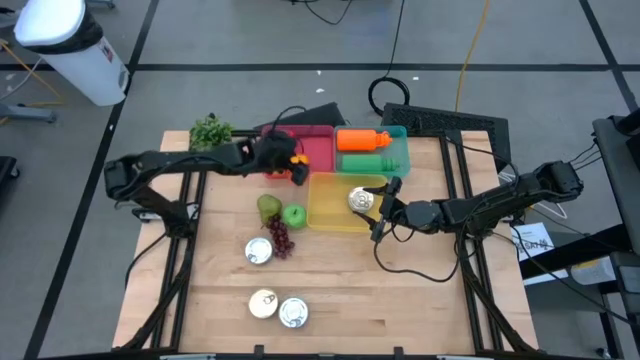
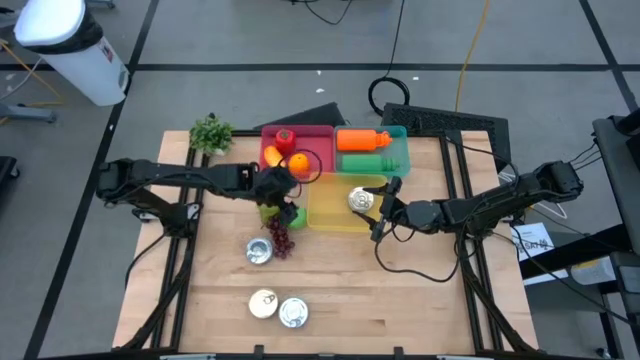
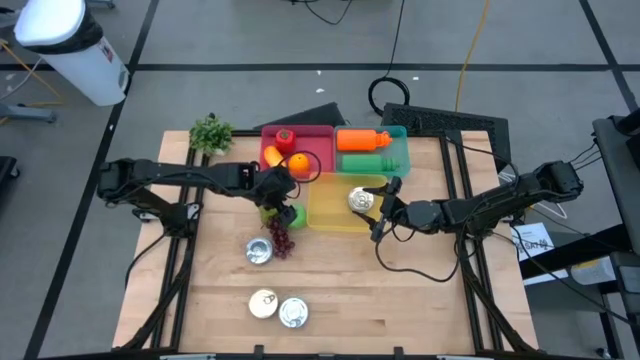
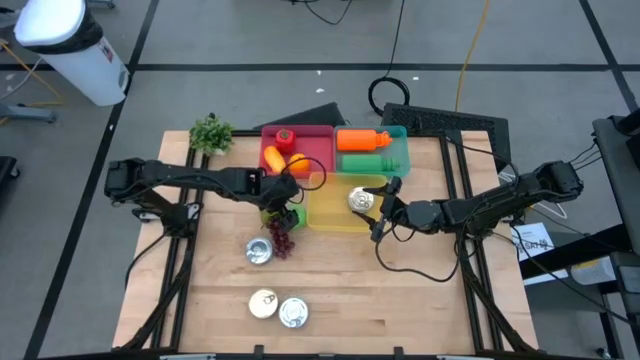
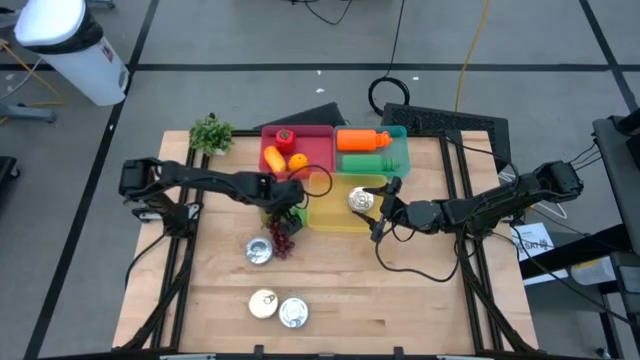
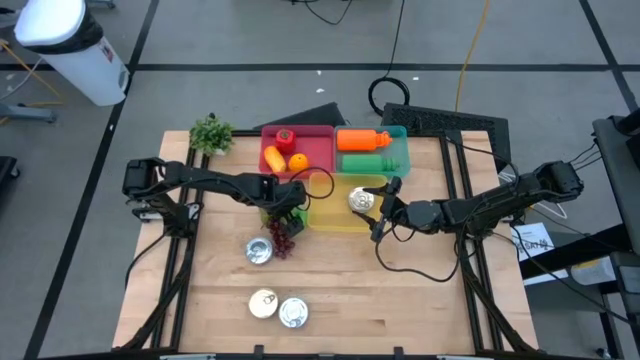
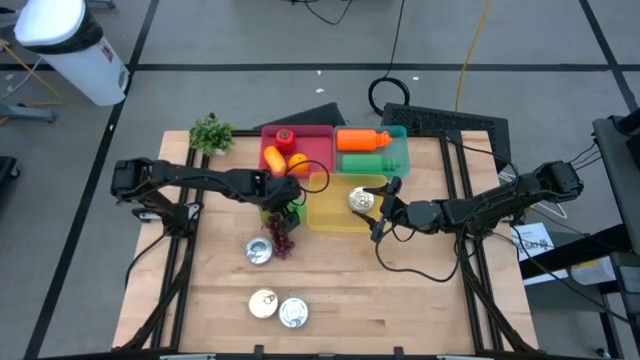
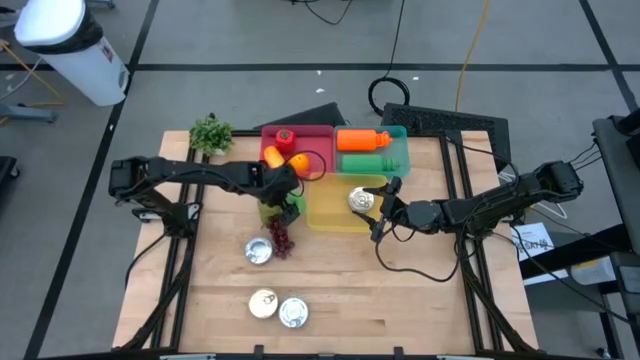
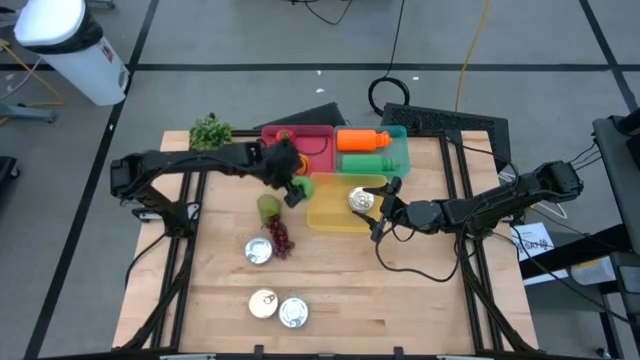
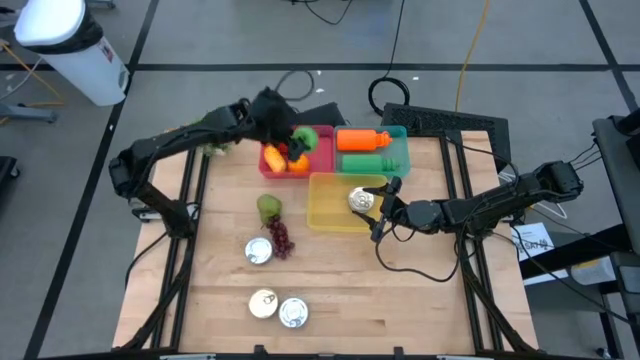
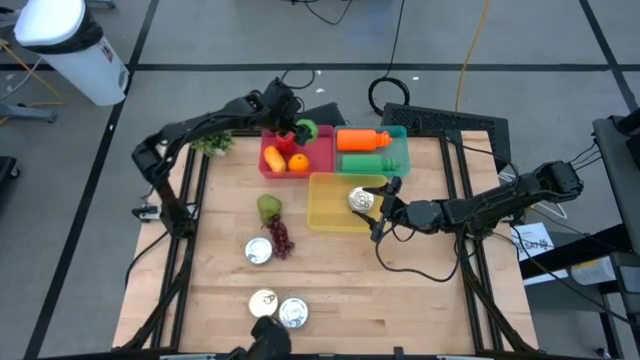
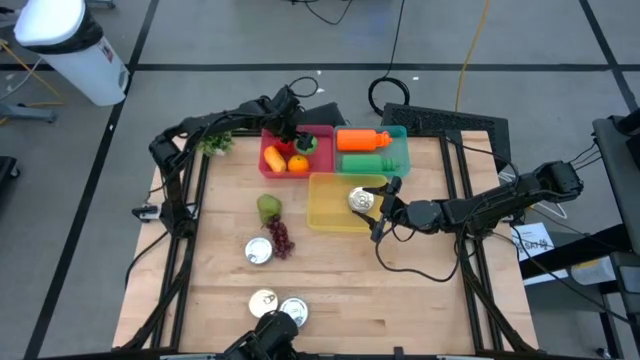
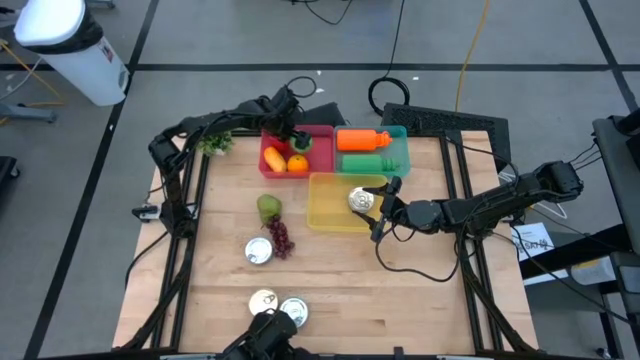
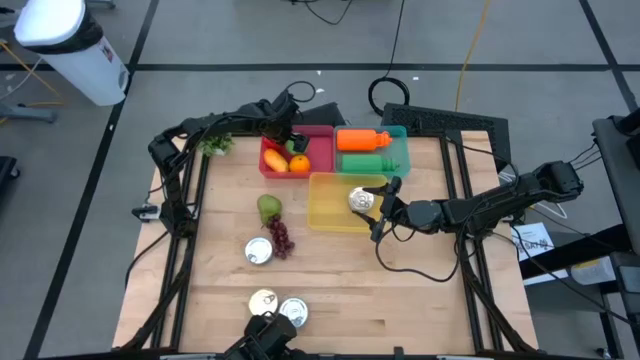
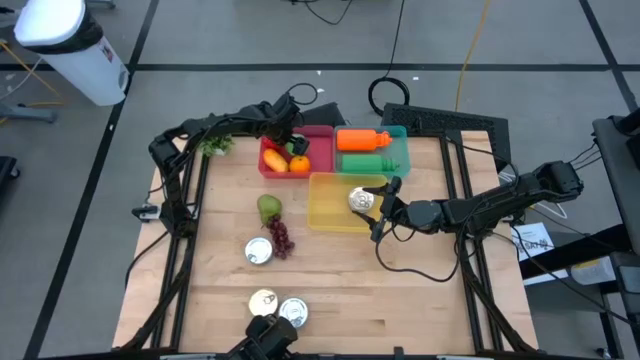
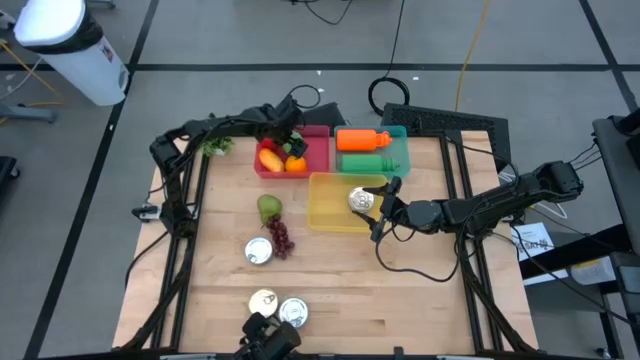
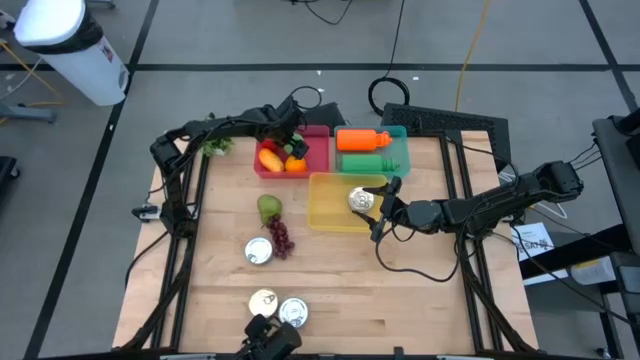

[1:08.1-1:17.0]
Task: Pick & Place Food Item
Put the green apple into the red bin

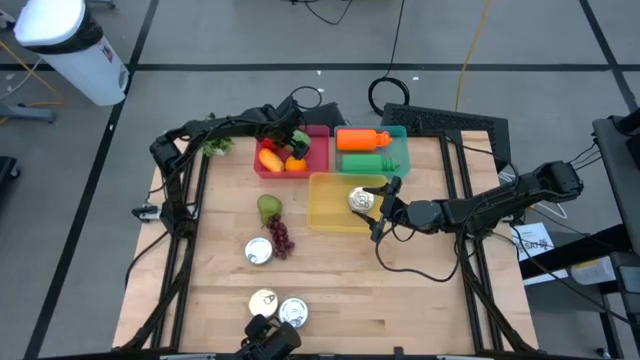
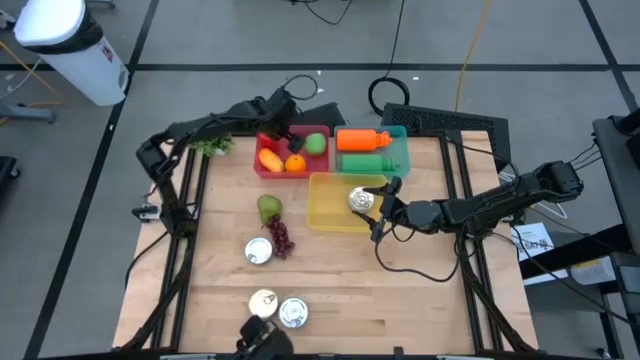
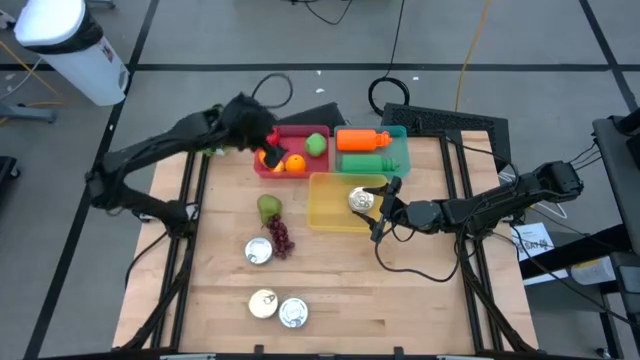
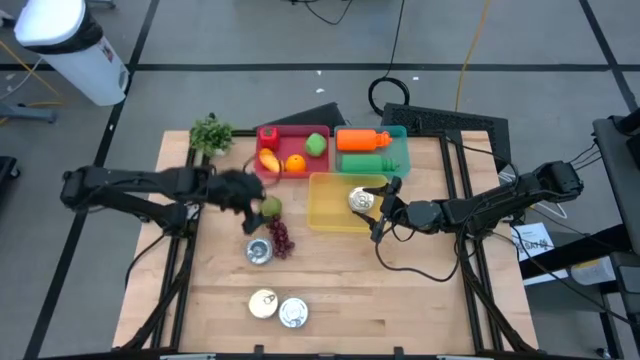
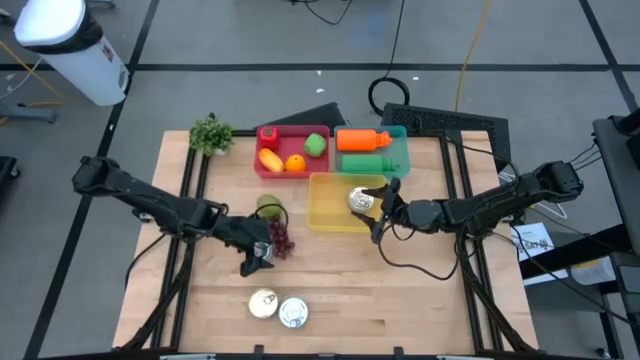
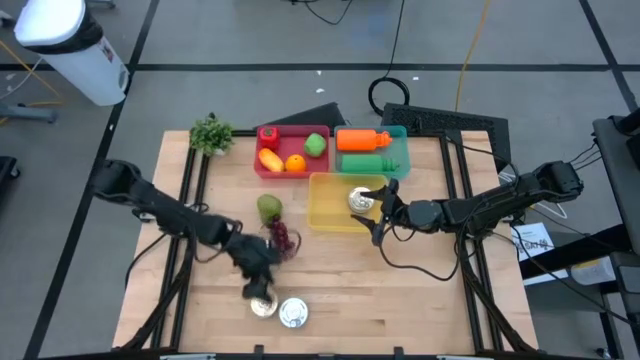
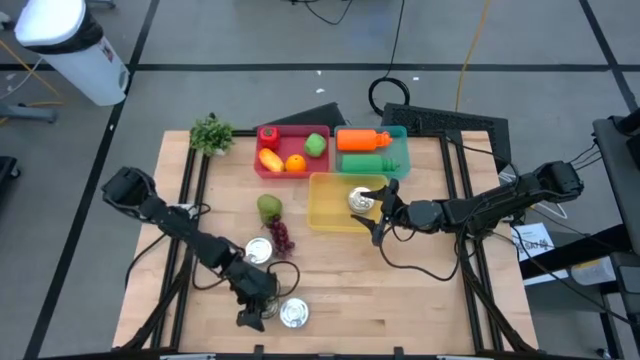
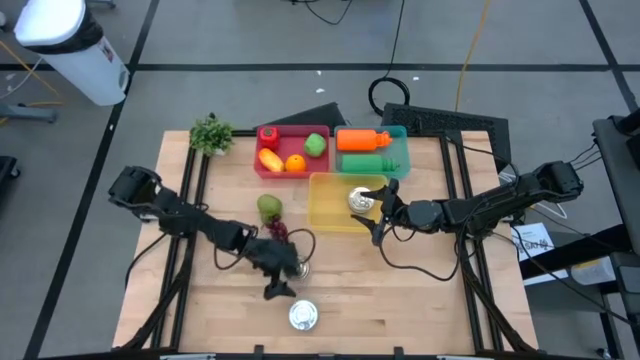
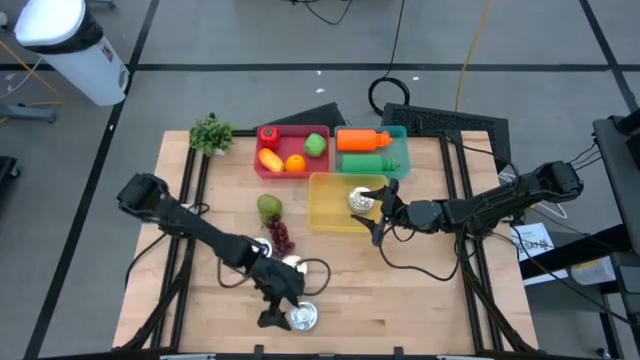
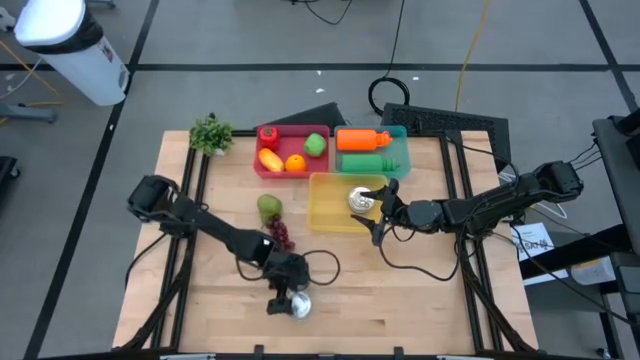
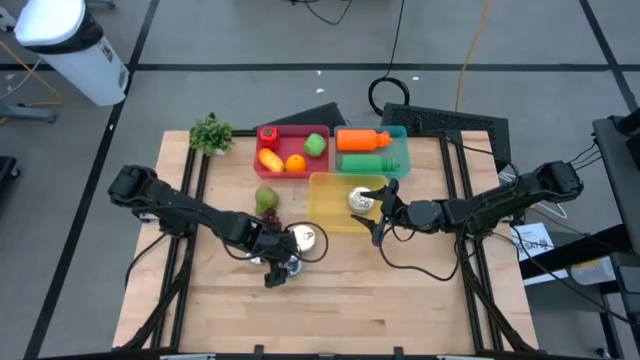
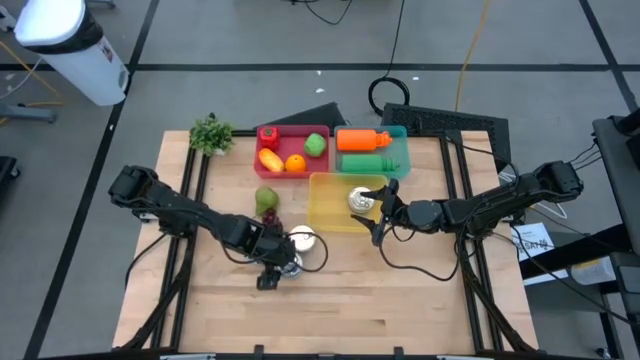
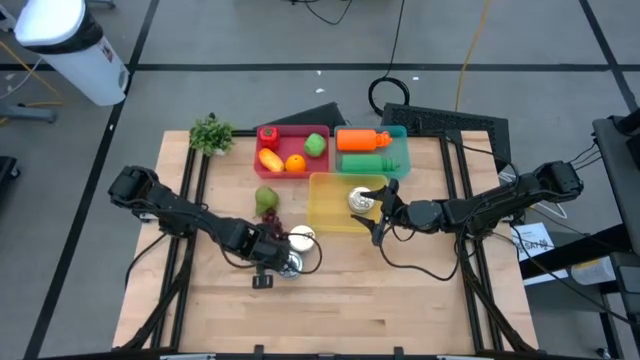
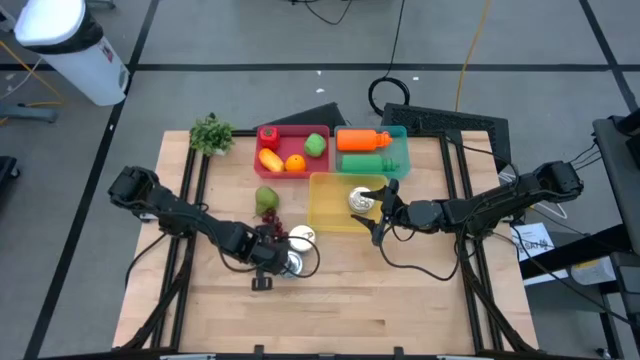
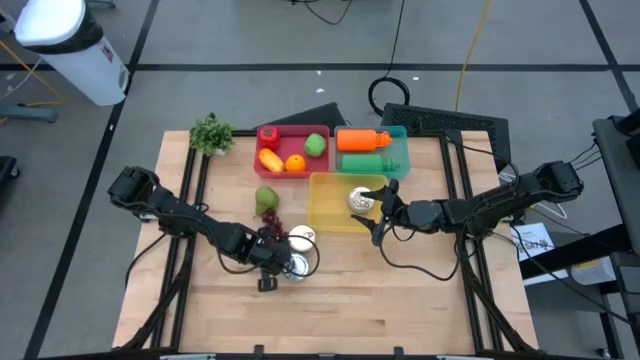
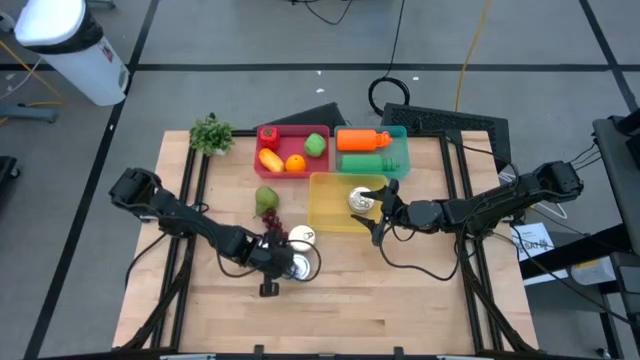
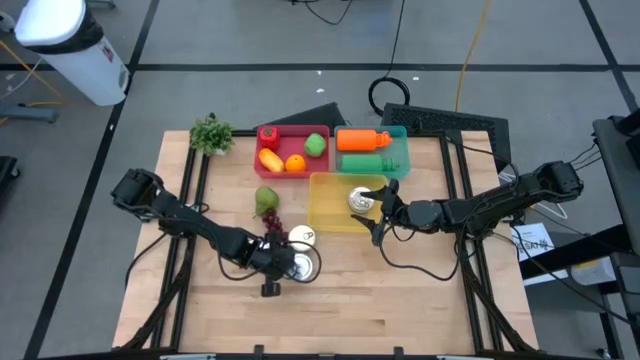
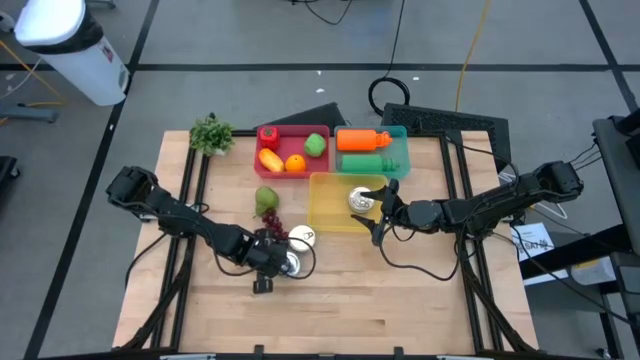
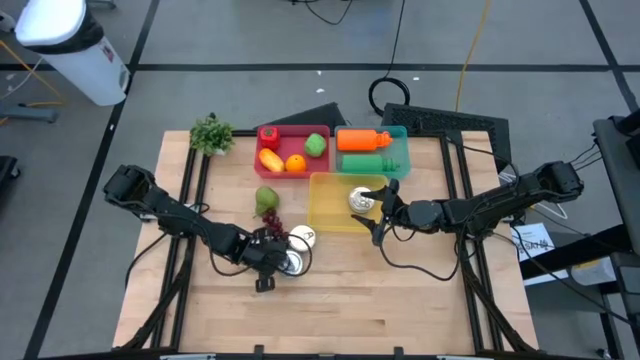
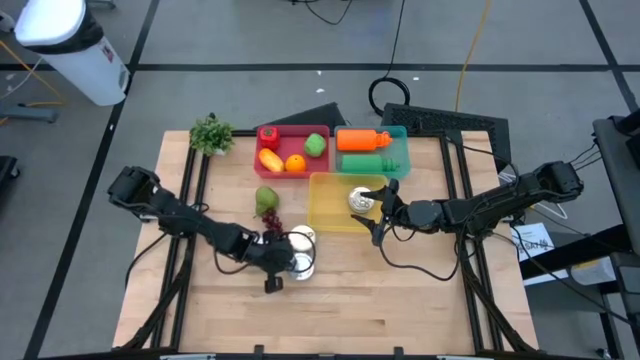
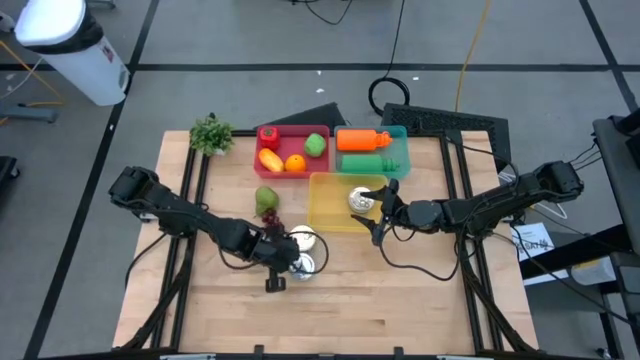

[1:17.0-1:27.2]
Adjust the tuna cans

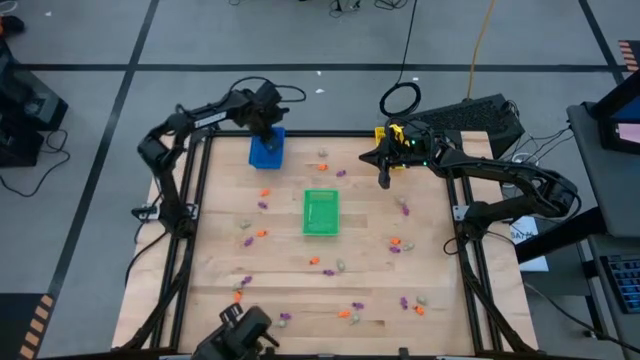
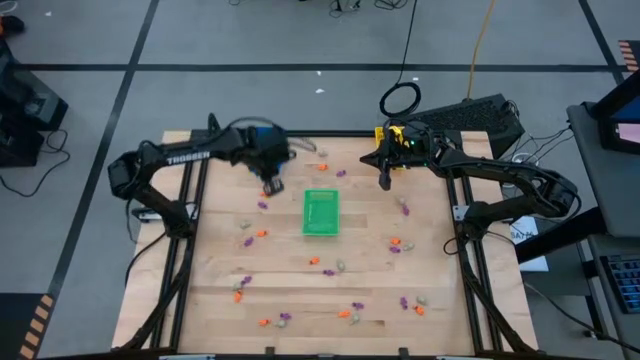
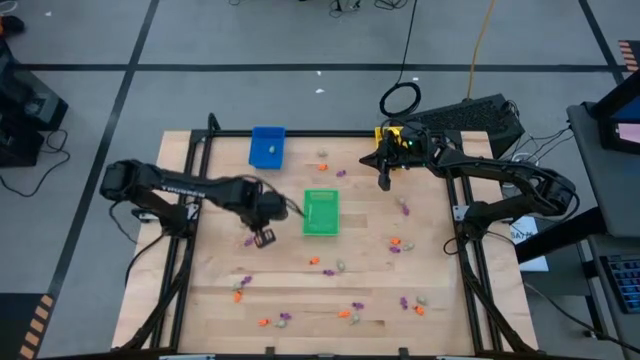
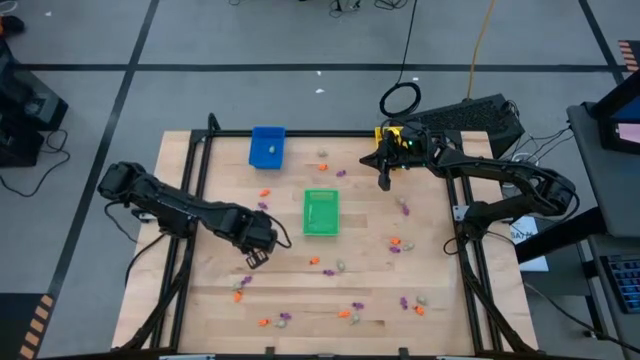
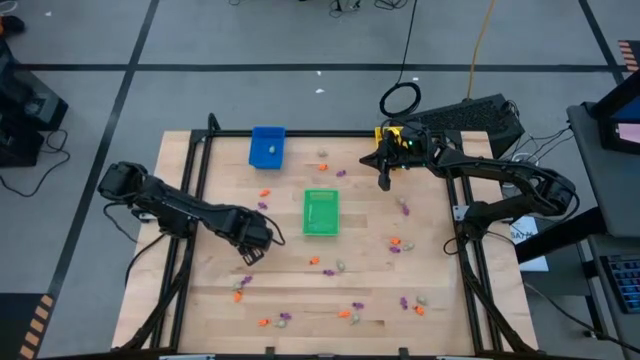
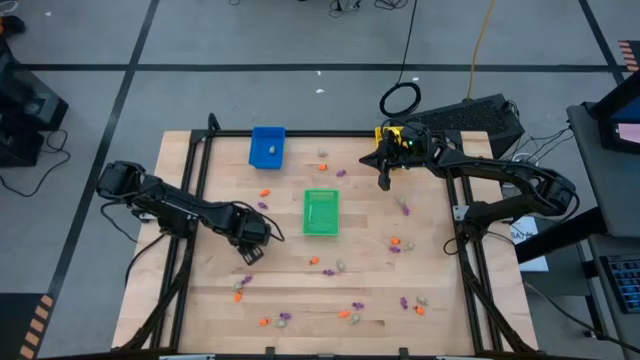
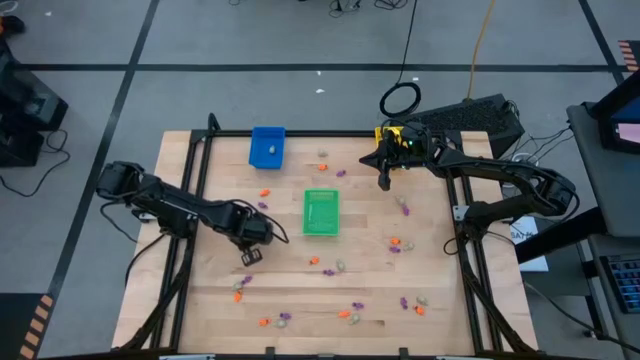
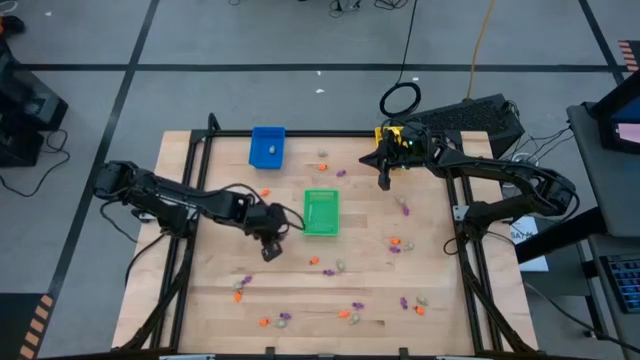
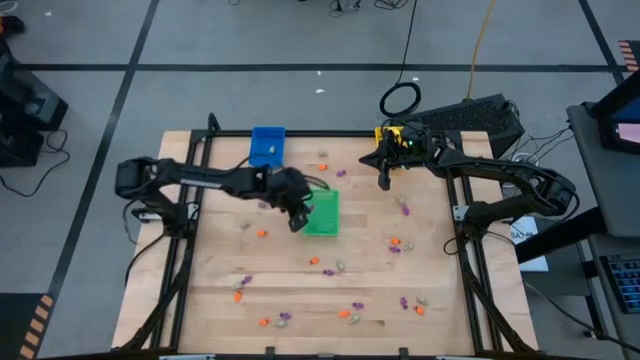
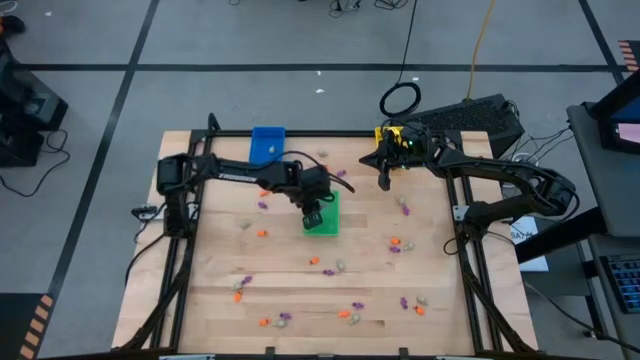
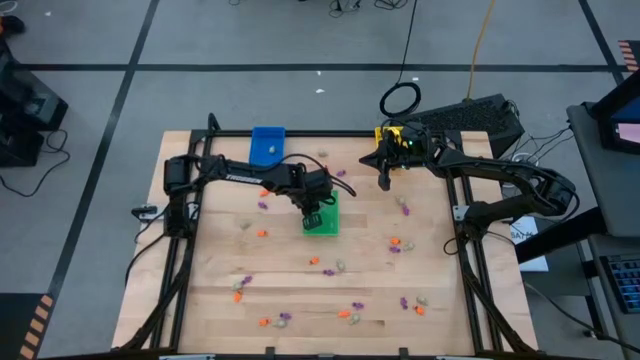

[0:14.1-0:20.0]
Task: Sort Halloween decoration
Put the purple skeleton toy into the green bin
